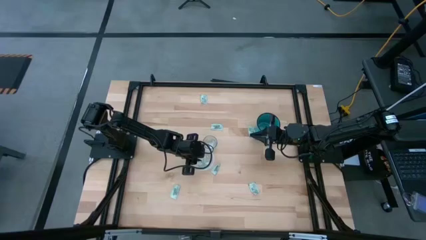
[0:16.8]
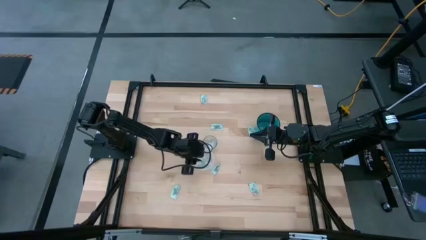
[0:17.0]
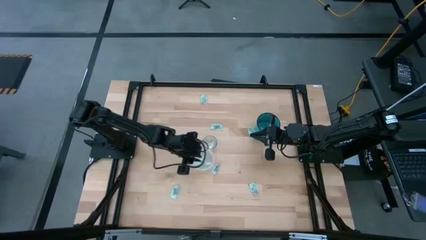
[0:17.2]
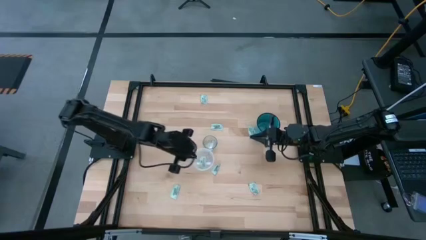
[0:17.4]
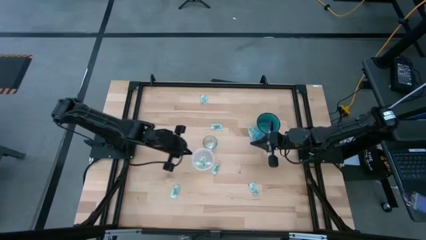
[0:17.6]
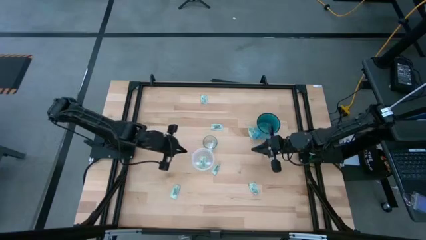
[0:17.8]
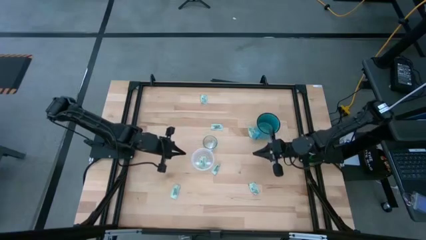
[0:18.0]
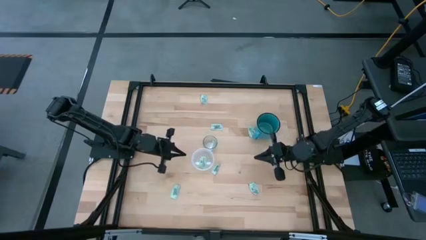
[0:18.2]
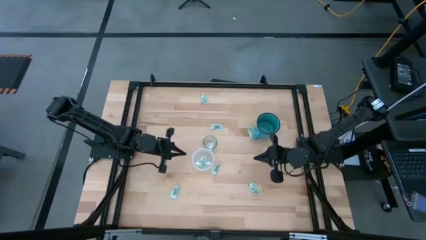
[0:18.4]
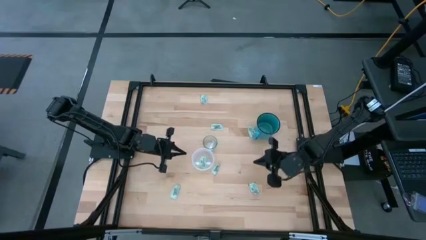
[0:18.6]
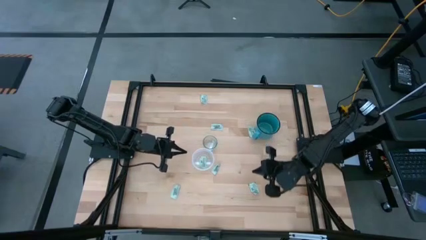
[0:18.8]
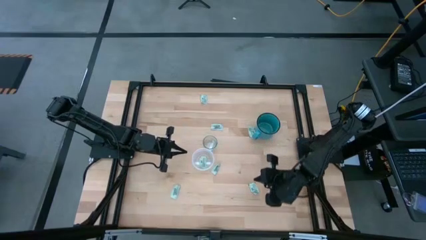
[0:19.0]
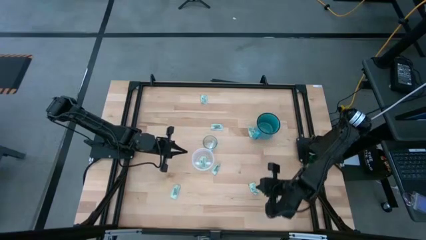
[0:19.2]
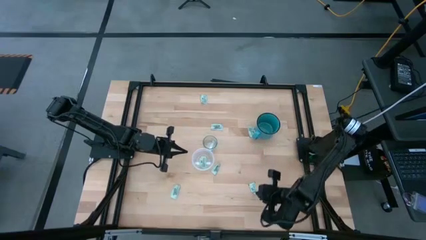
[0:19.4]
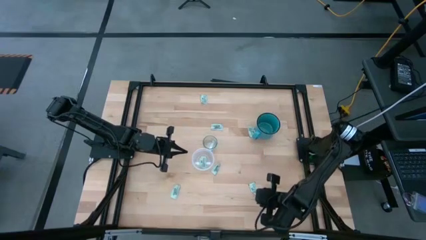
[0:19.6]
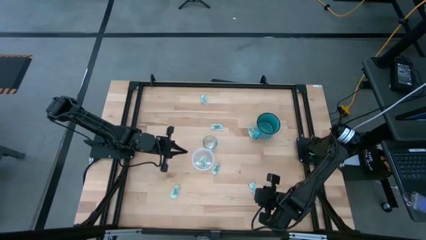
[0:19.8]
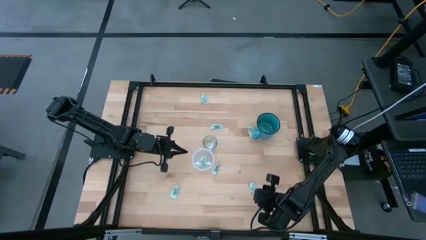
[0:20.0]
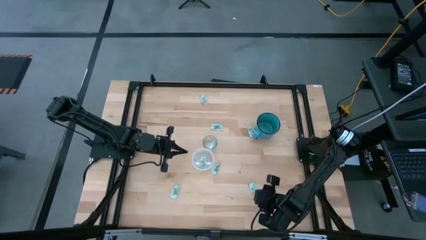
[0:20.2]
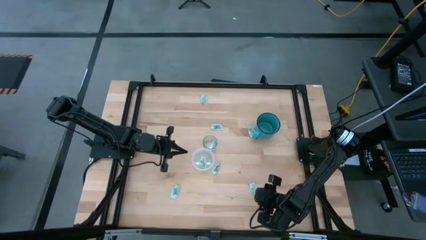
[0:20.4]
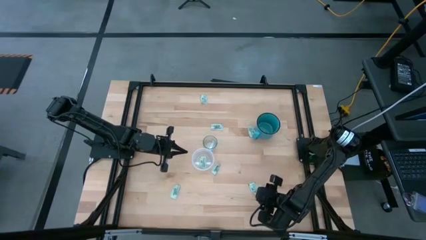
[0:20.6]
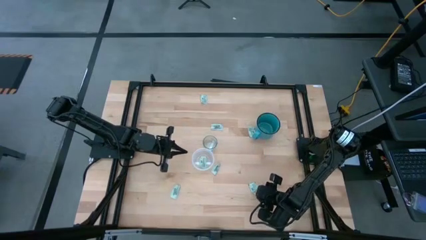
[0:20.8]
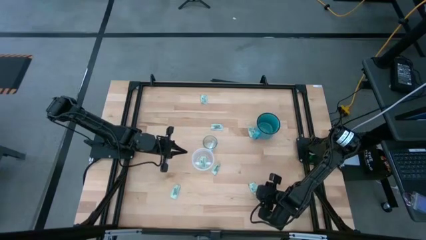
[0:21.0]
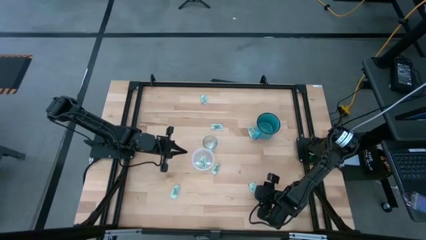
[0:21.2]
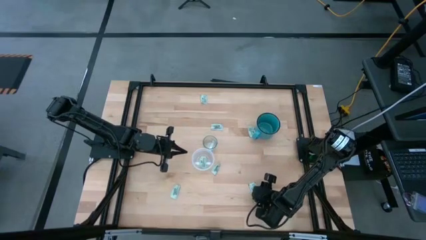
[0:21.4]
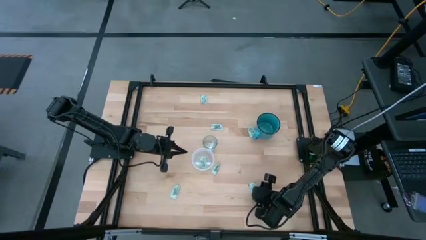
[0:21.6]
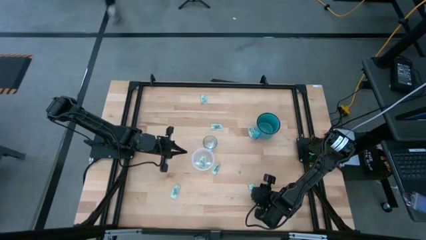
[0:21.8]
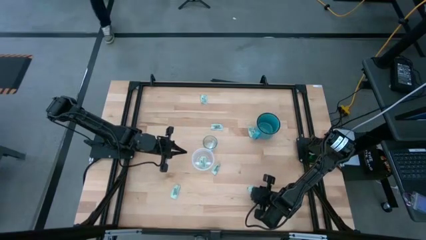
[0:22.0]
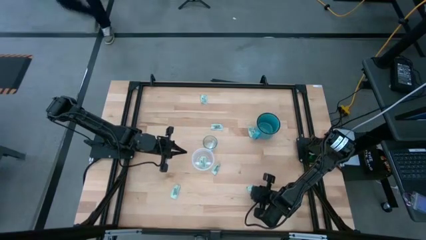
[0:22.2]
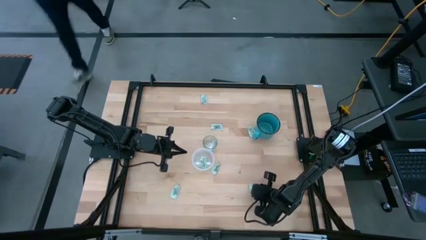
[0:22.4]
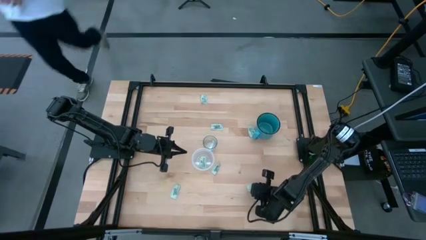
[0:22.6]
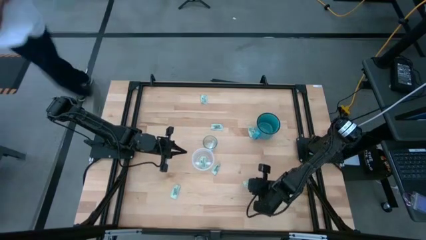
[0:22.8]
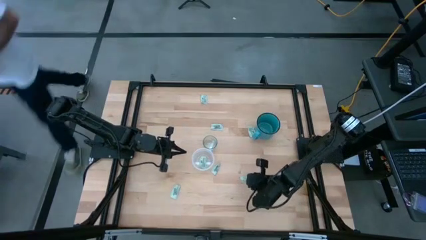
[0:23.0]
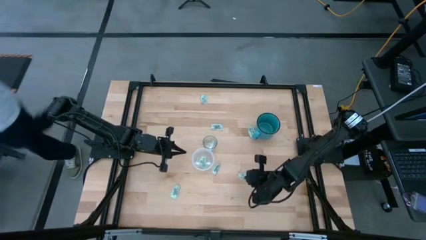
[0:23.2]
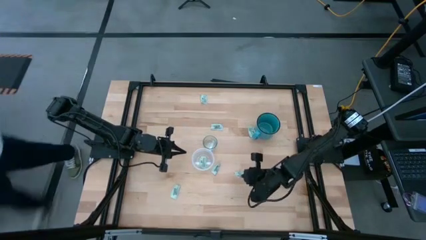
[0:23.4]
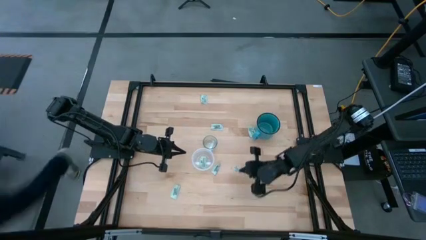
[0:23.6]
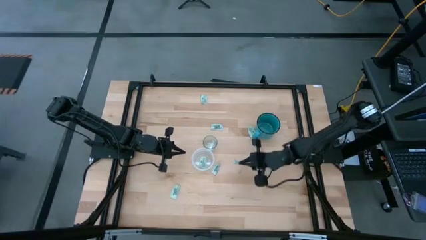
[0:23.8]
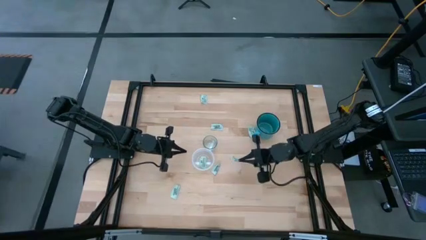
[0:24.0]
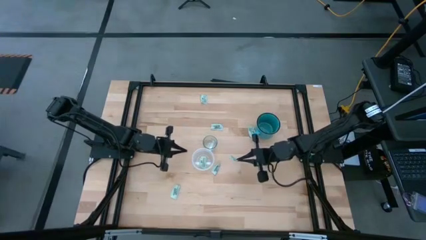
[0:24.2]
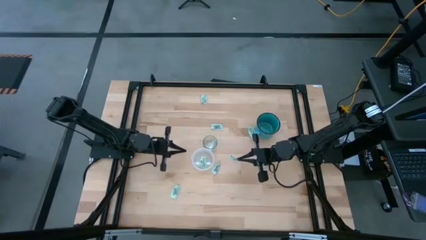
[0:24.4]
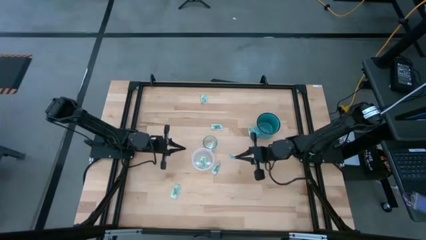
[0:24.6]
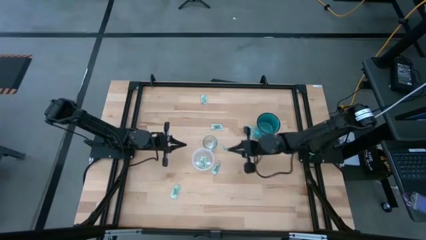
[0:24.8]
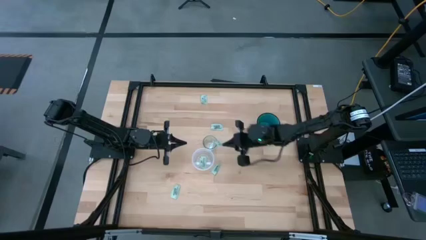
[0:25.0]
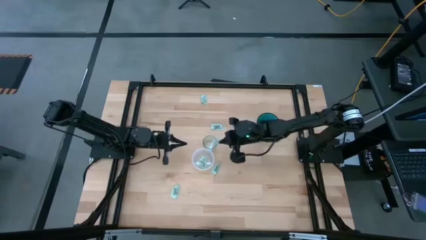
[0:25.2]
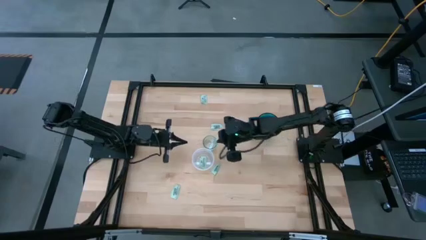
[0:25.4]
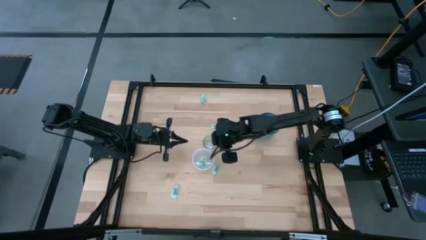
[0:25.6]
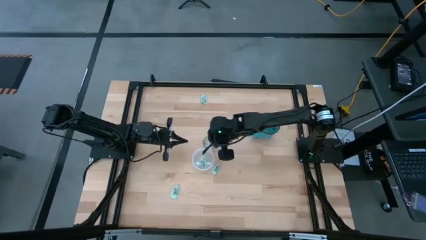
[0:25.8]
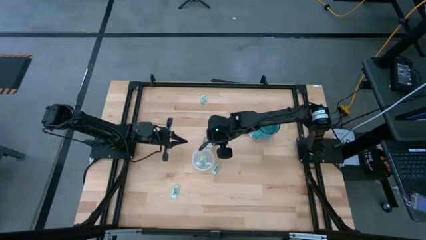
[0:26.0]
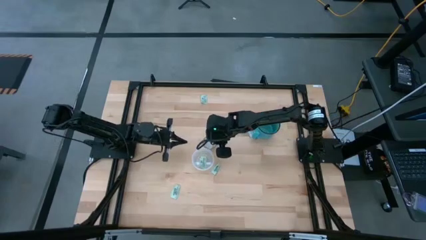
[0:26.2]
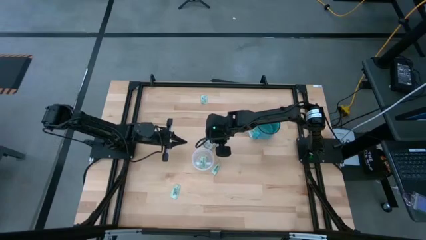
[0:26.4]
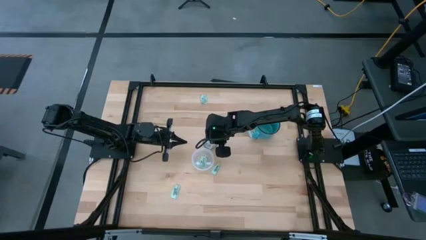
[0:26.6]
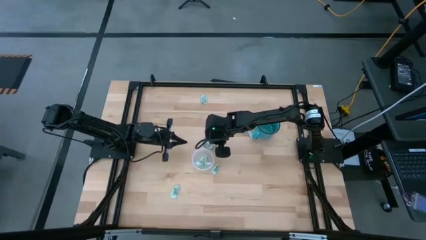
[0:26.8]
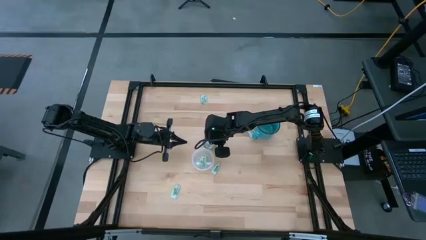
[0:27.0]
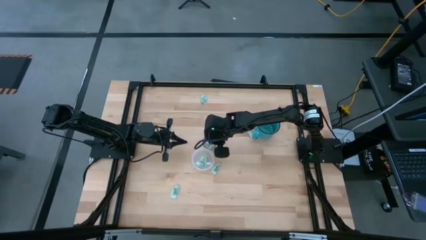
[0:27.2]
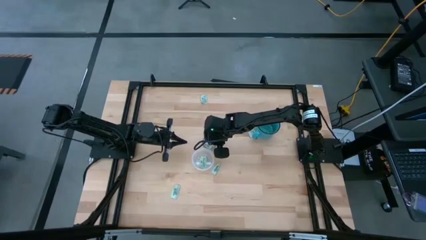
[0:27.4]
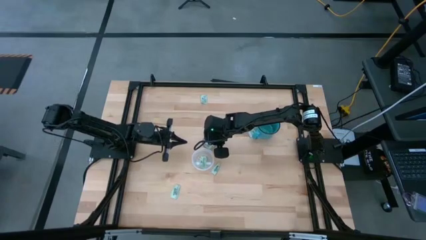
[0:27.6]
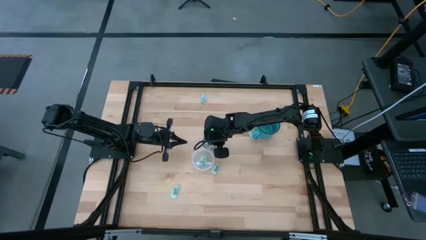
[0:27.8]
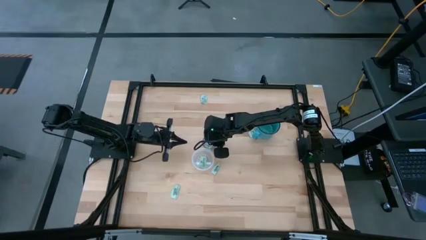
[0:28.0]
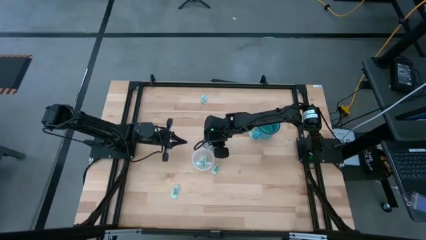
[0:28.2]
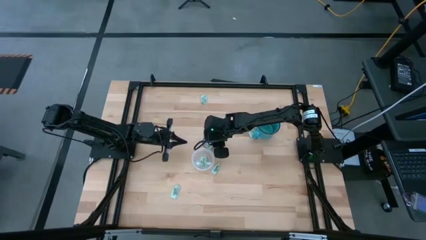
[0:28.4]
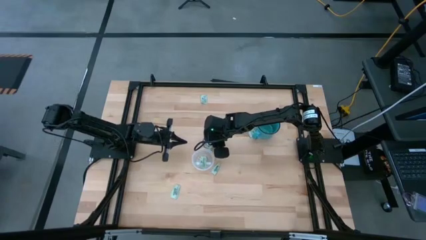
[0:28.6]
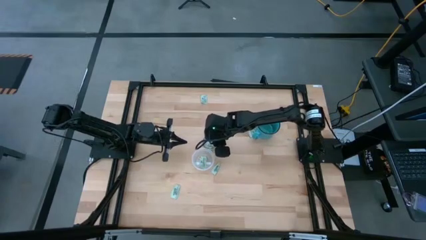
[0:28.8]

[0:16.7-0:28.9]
Task: Pick and place items into bin
Put the transparent stevia packet into the transparent glass bin
